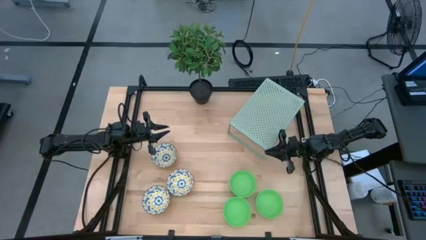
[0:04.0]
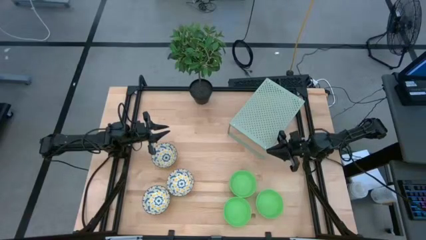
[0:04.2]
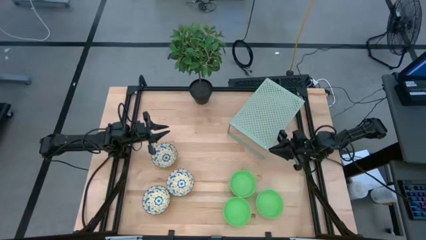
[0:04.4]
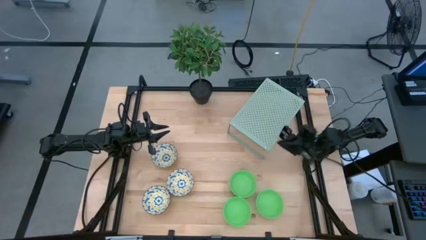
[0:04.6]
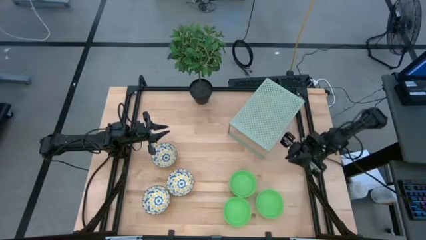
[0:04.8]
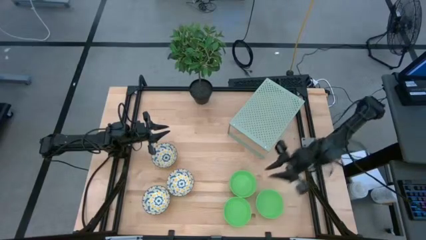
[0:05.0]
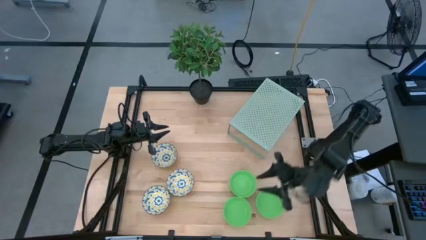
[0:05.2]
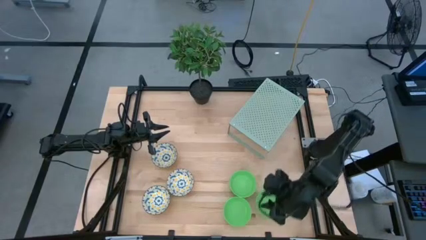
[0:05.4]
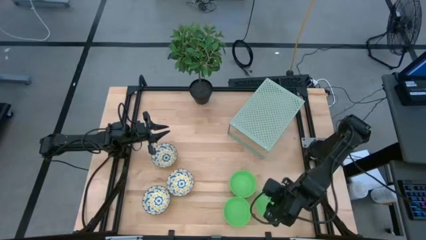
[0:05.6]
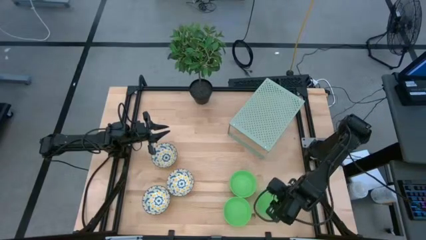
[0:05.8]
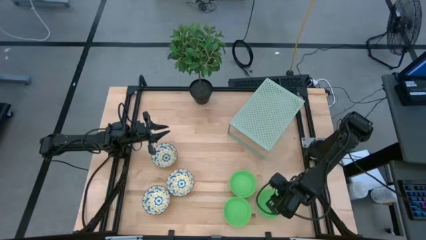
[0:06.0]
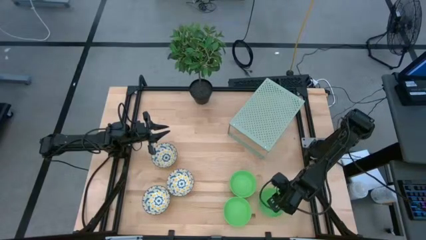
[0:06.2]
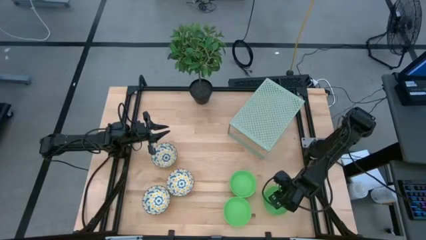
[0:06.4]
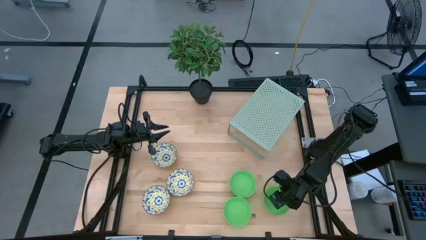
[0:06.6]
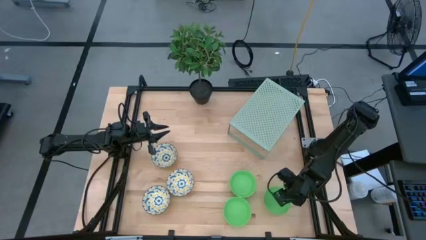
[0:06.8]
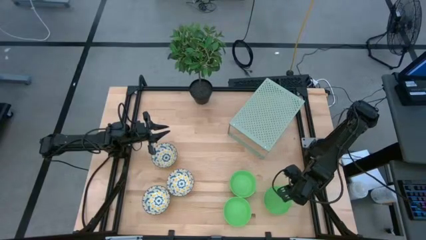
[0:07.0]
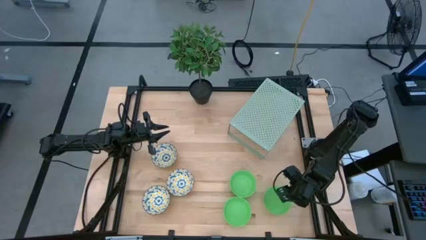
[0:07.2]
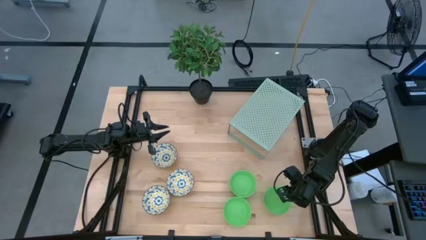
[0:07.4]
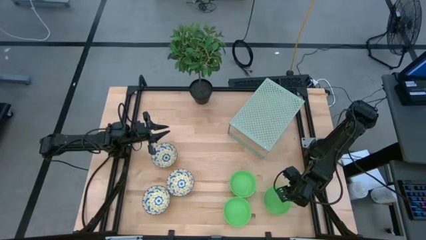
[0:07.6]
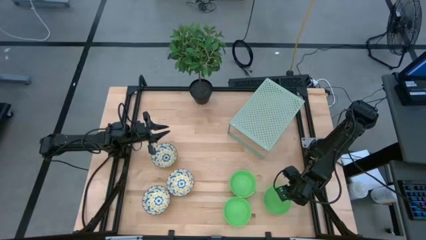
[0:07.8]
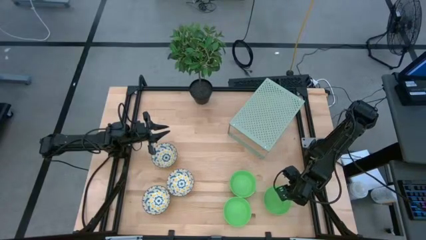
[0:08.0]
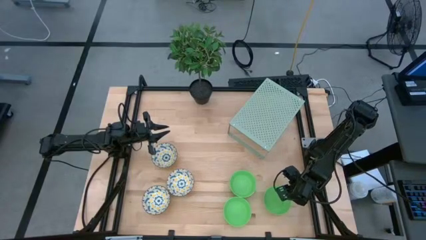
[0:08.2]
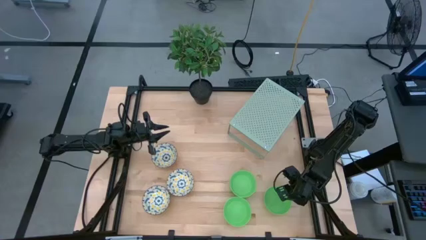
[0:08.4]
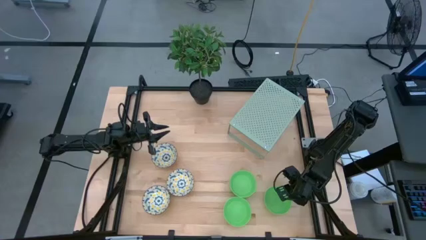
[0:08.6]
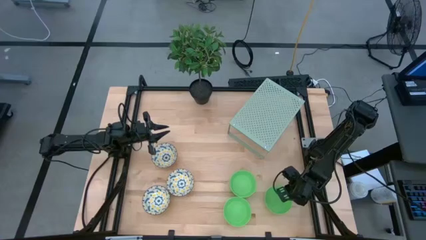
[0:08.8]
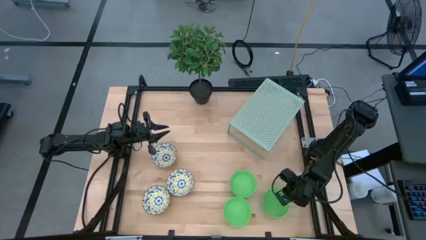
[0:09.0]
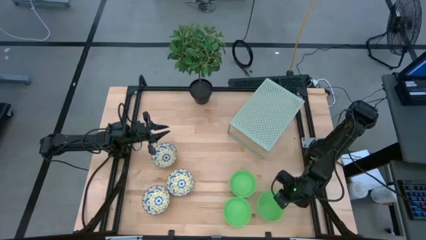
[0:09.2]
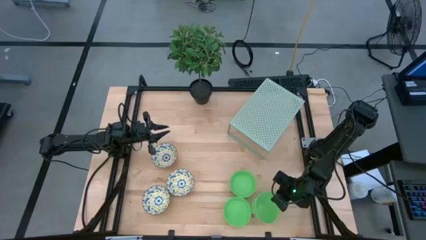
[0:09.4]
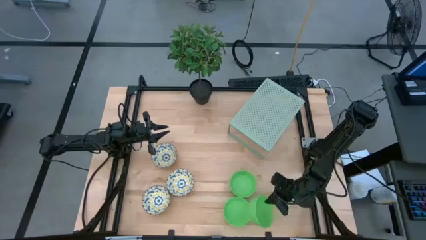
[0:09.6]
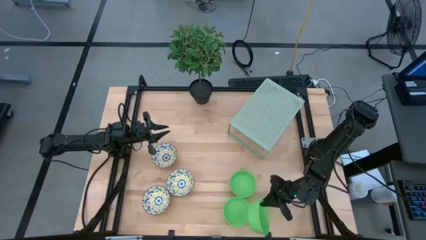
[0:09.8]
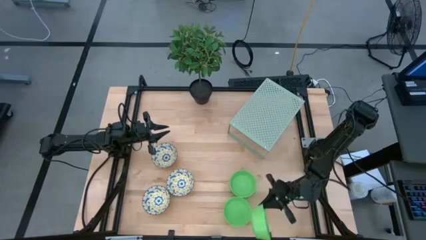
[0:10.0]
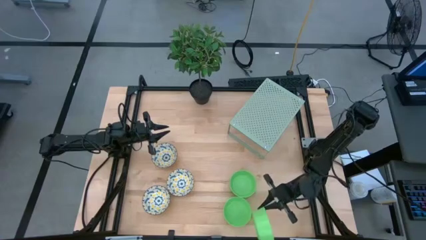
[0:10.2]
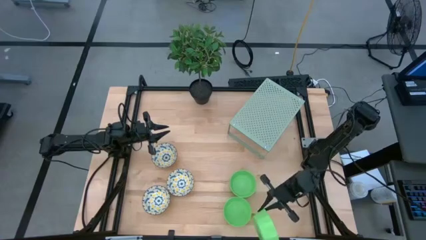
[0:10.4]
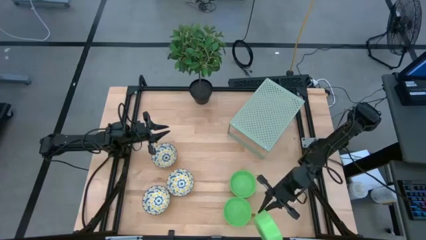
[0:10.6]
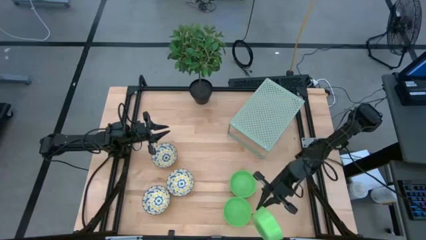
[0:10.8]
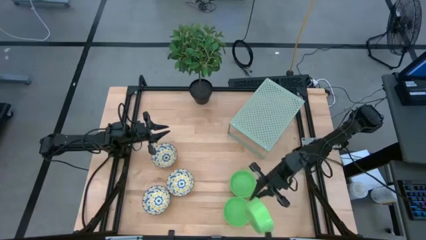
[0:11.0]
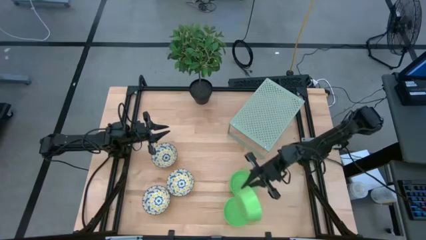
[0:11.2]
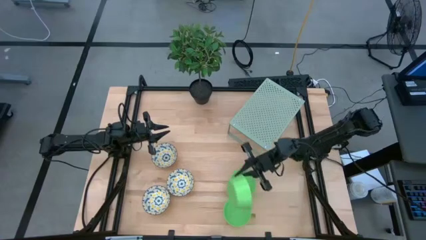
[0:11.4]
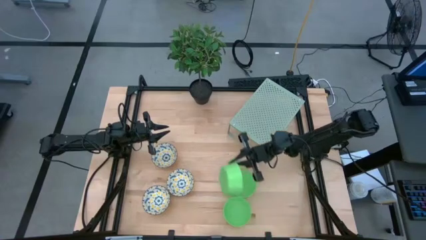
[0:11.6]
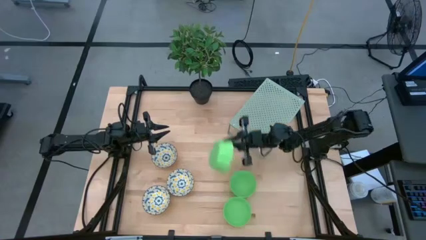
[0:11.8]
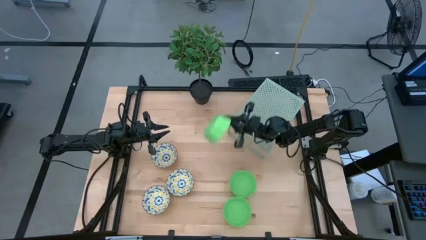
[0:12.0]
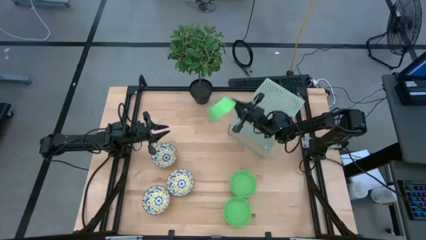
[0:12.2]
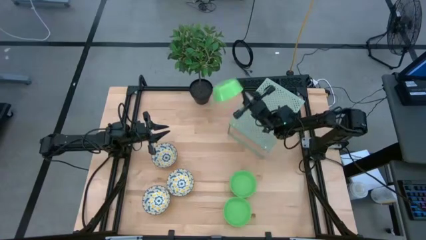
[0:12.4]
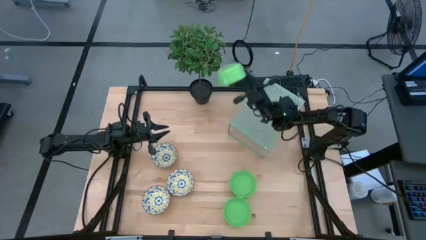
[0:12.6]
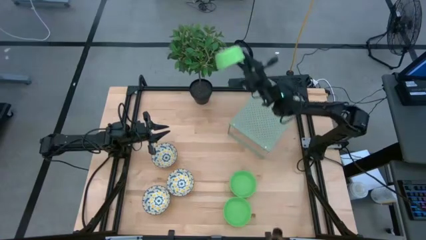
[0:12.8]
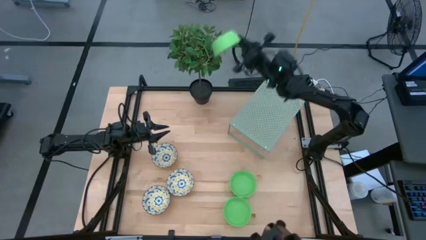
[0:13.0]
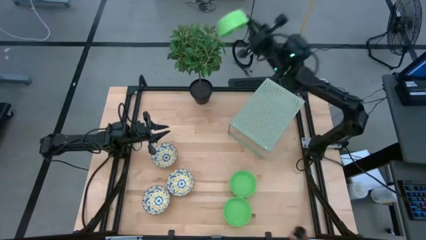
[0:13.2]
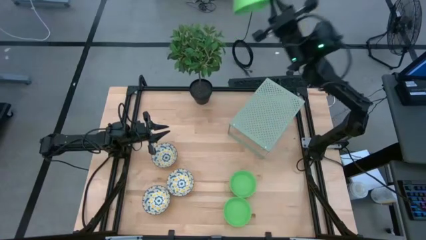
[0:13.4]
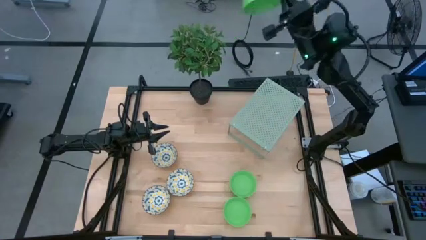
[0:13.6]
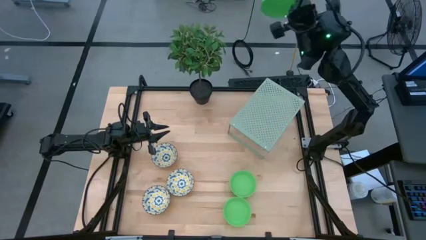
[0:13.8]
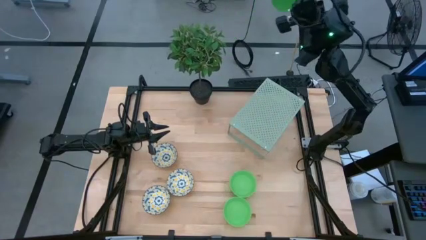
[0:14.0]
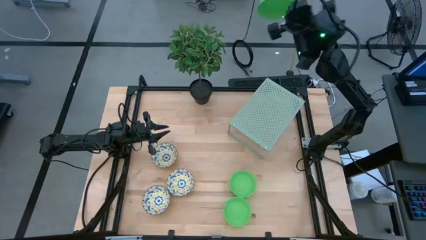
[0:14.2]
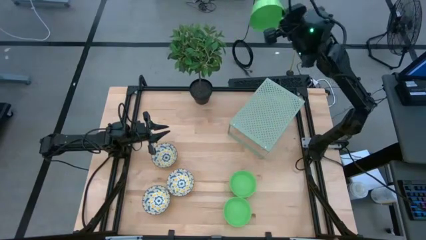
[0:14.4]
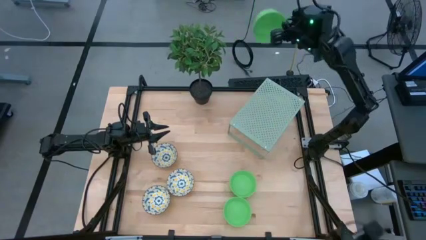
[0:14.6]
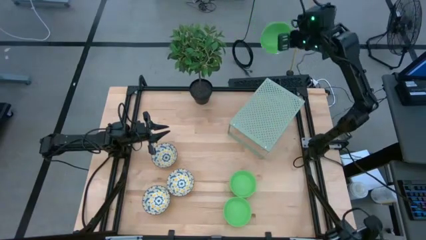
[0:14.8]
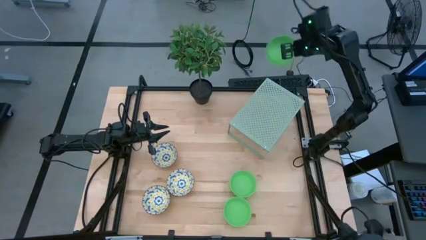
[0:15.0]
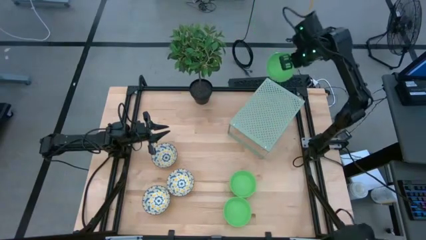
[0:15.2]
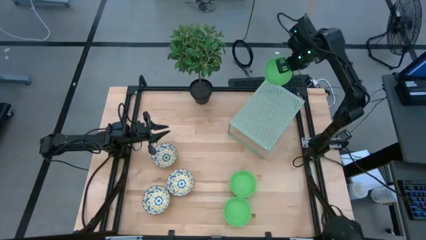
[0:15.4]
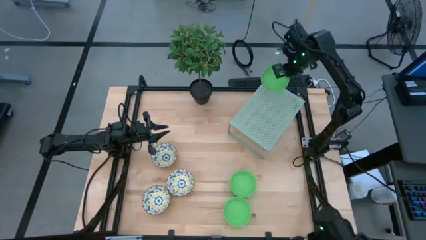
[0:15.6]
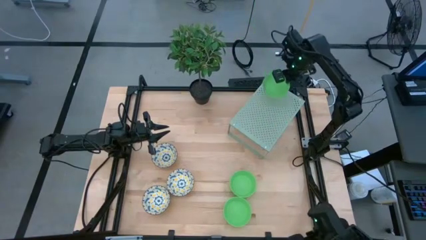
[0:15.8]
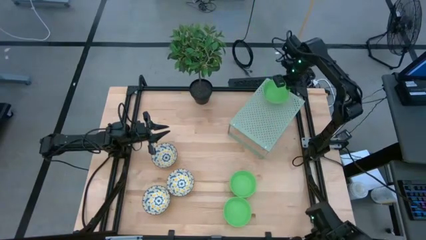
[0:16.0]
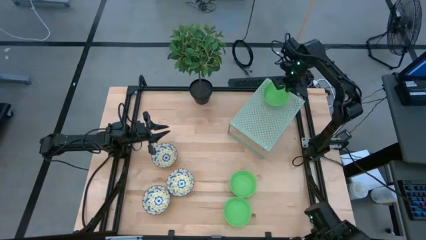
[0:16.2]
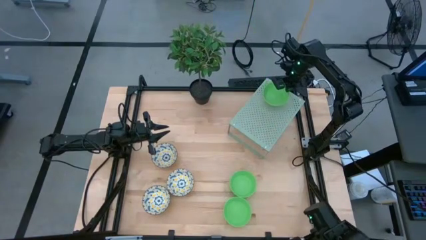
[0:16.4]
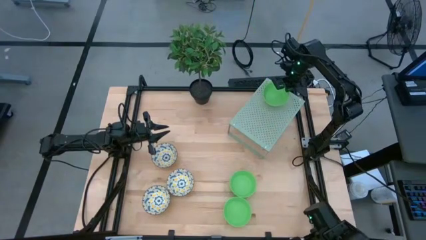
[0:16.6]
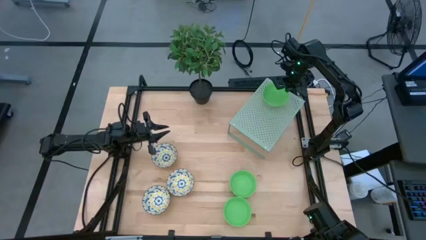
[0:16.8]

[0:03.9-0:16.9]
Task: Pick & Place Mini bowls
Put the right green bowl on the shelf
